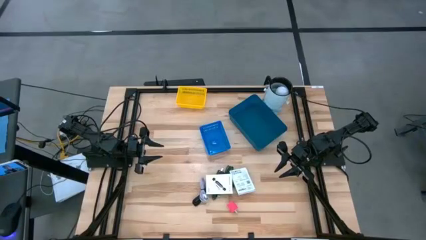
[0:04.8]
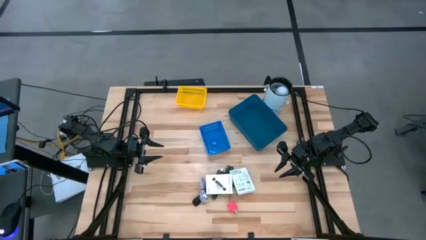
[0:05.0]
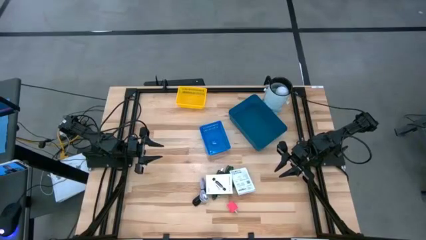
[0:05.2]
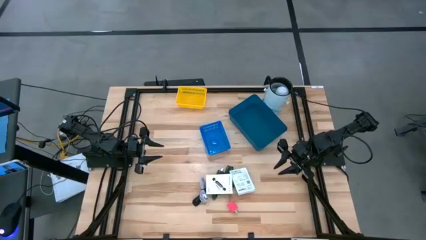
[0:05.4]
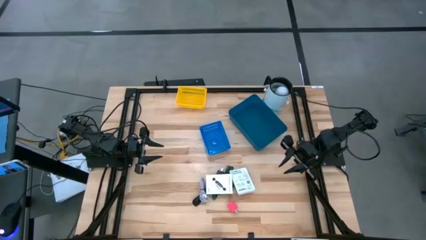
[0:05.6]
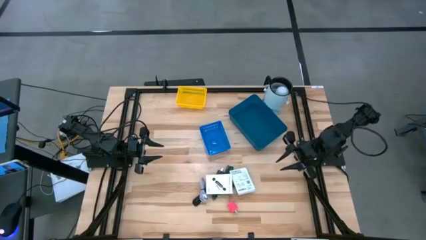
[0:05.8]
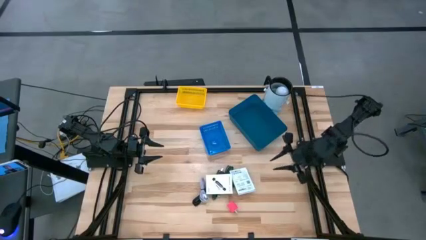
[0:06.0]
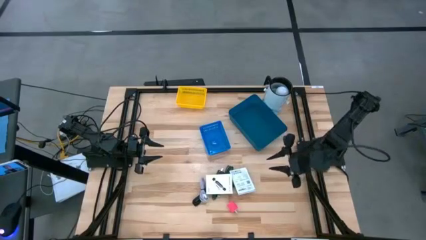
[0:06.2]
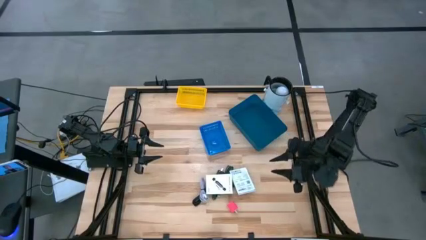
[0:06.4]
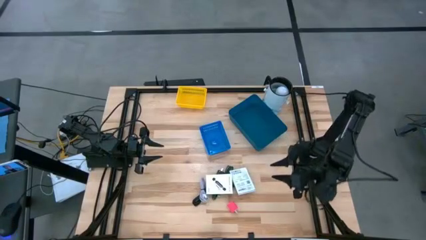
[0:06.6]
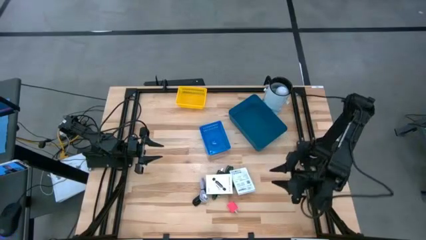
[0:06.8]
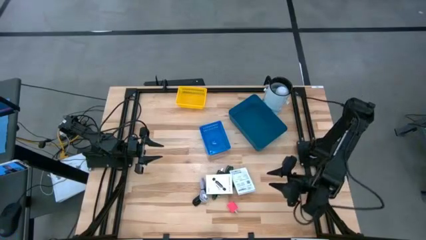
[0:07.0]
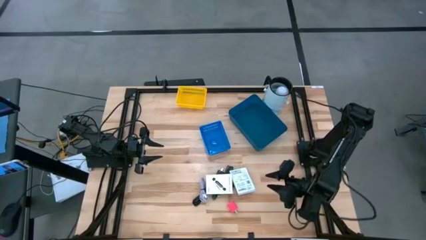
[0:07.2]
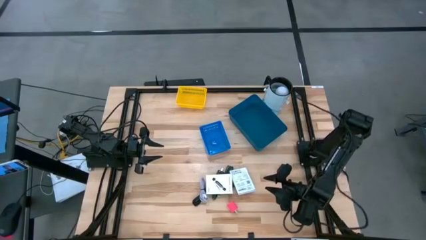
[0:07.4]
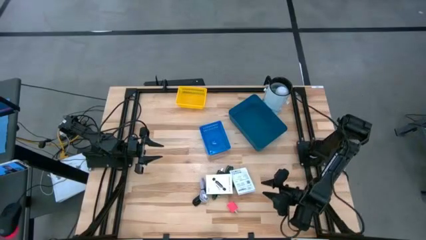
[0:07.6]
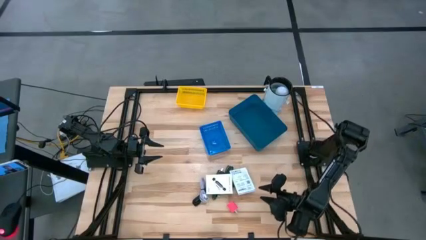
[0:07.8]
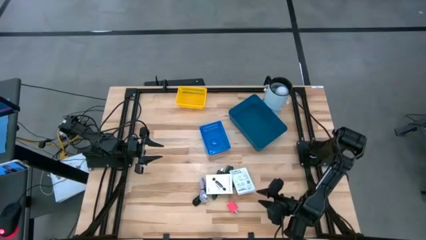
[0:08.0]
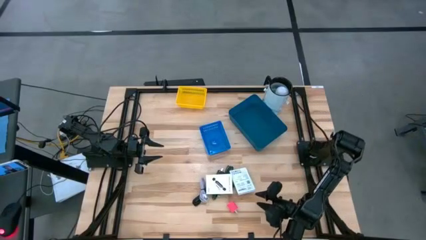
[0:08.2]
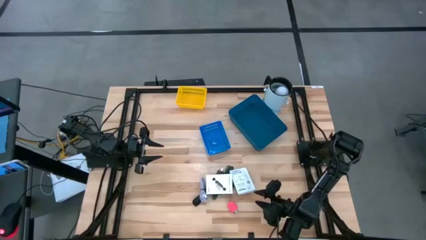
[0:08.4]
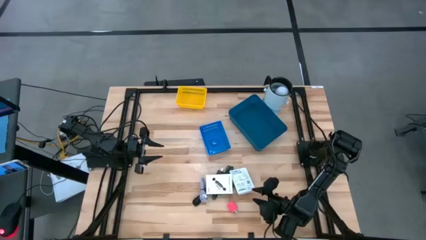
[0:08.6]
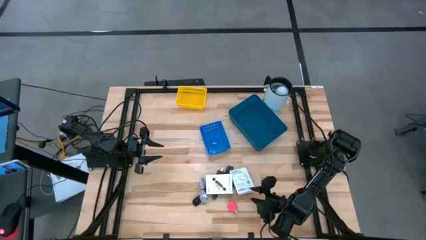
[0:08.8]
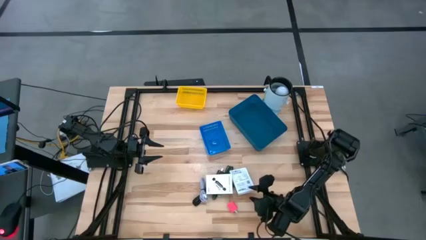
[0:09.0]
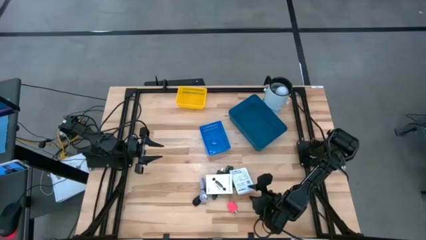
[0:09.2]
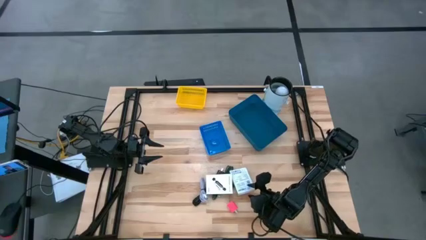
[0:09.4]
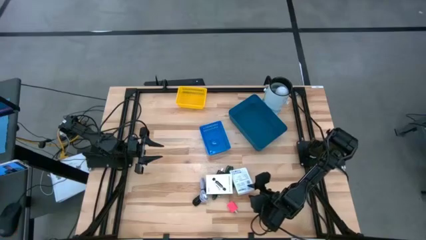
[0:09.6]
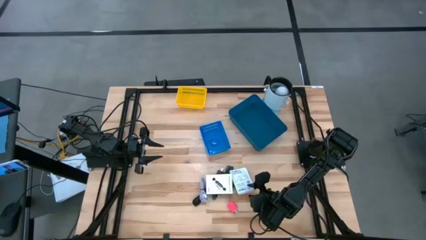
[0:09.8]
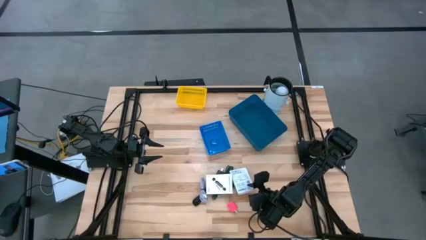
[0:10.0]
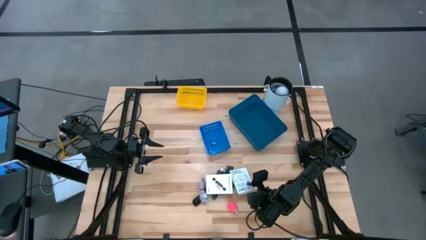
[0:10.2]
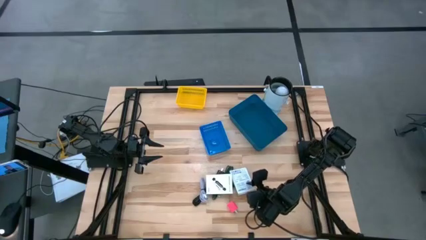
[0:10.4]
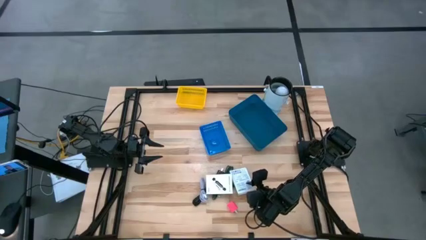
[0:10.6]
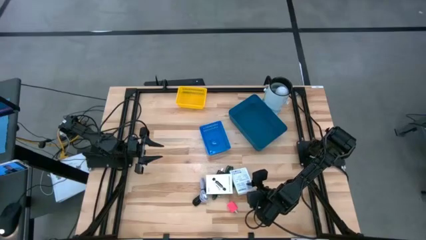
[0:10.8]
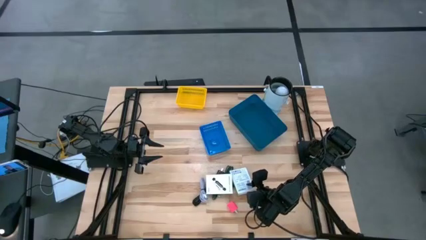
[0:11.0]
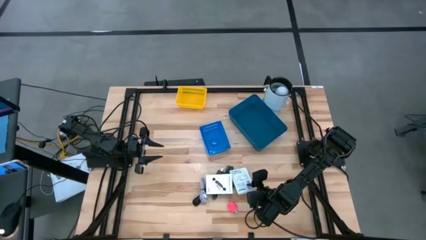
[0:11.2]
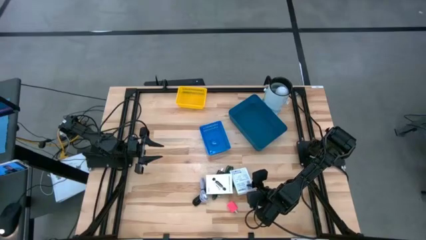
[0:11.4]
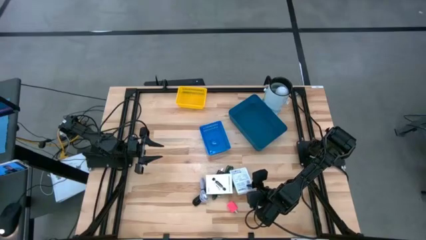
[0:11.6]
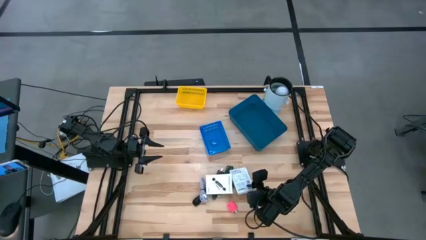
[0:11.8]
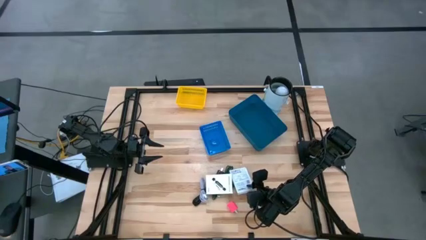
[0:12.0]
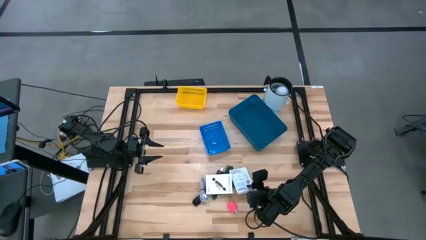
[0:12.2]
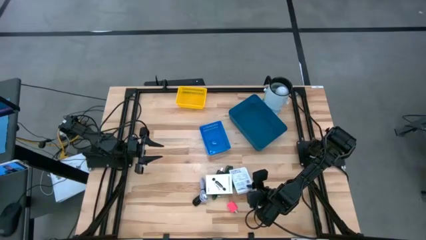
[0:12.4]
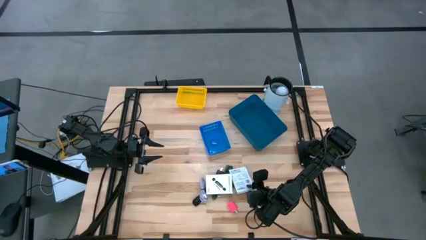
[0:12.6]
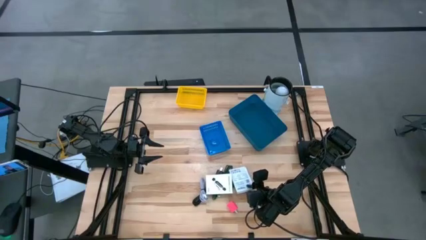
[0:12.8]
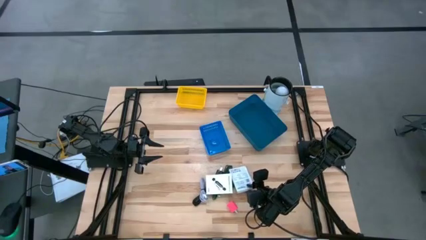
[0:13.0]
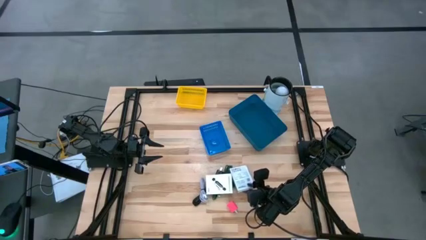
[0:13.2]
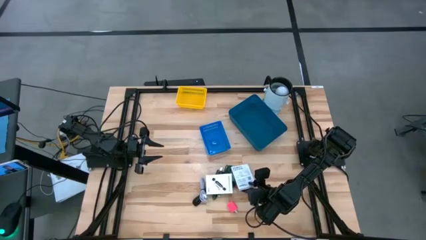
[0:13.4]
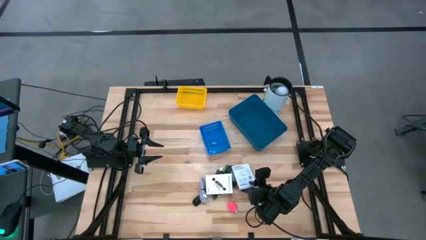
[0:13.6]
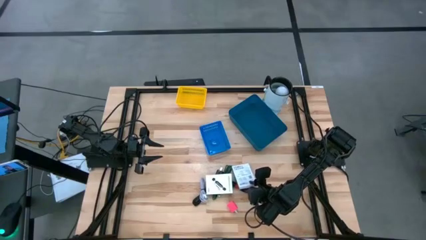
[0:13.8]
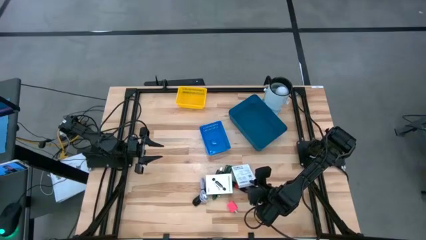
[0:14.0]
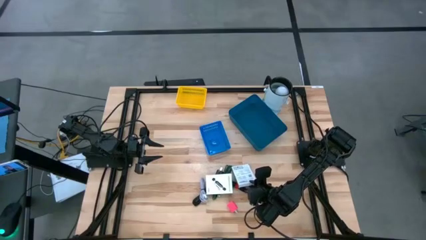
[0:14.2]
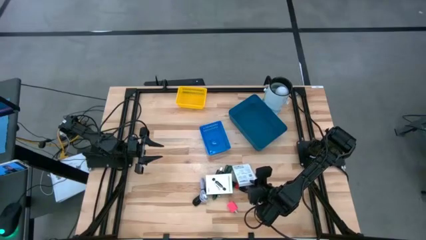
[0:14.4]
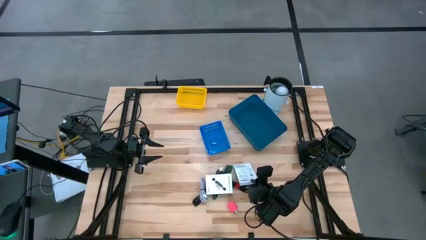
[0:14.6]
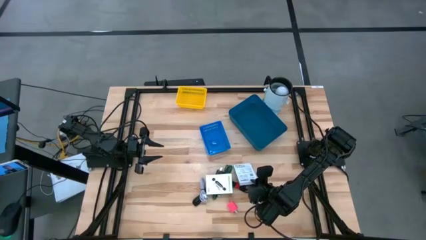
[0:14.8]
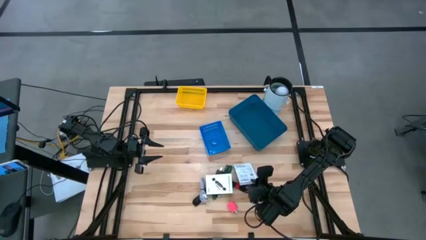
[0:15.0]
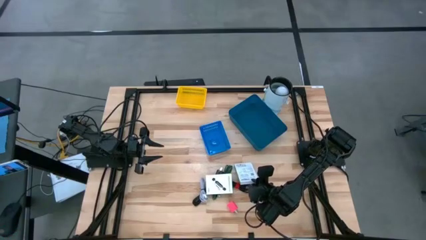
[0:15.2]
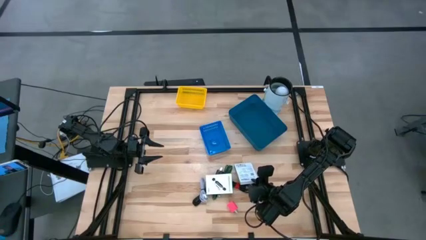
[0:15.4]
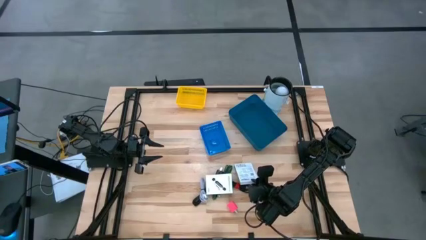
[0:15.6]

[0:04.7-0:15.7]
Task: Pick and place items into bin
Put the white card reader box into the yellow bin
